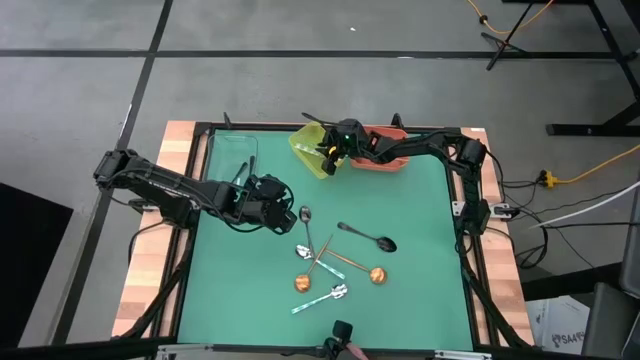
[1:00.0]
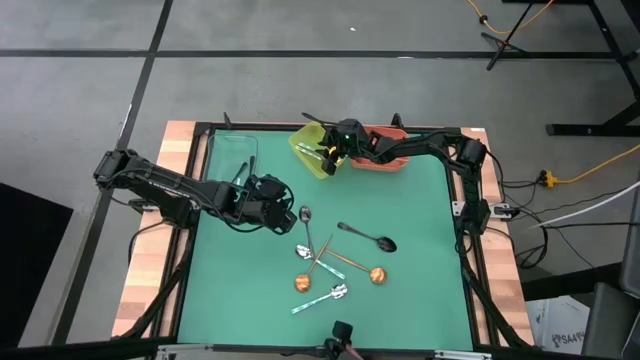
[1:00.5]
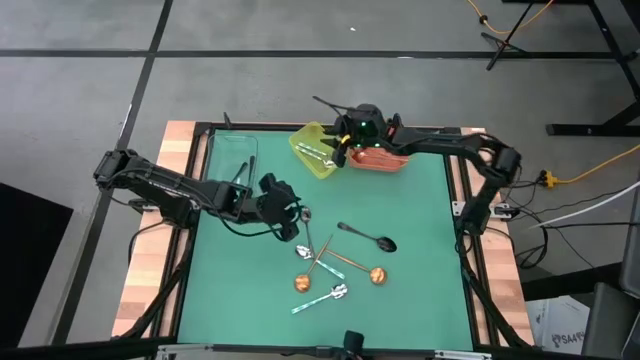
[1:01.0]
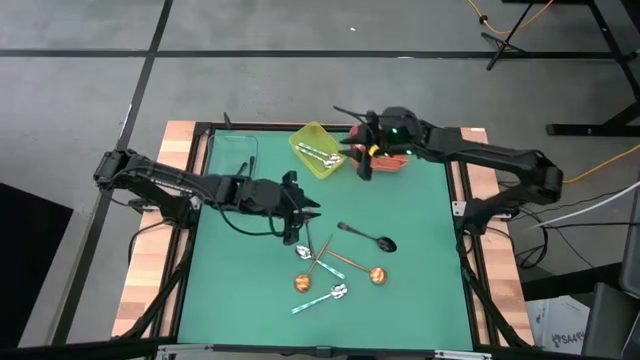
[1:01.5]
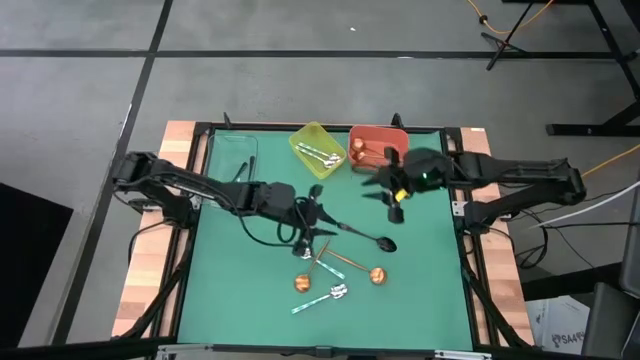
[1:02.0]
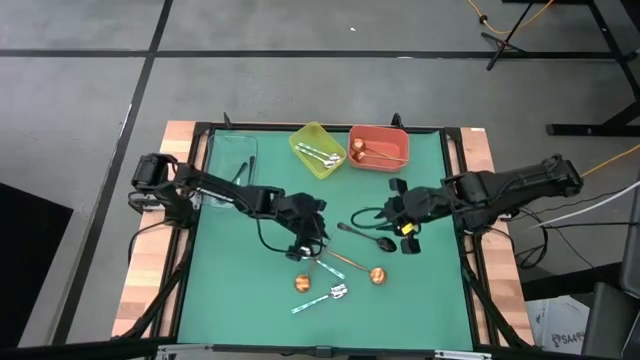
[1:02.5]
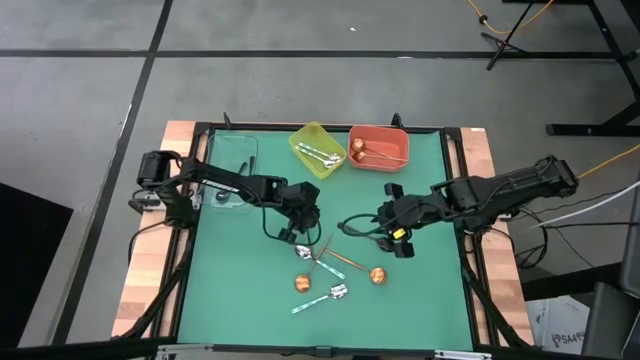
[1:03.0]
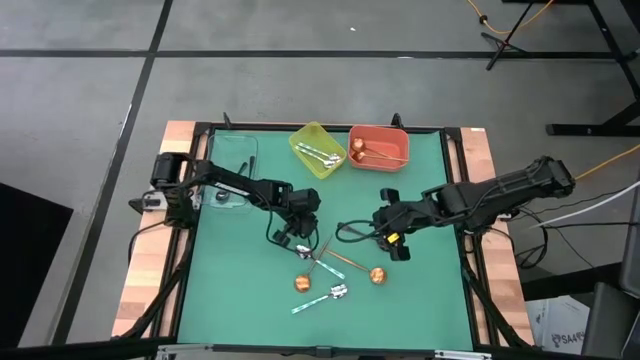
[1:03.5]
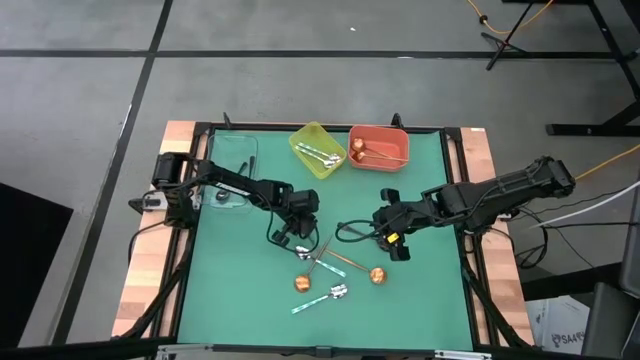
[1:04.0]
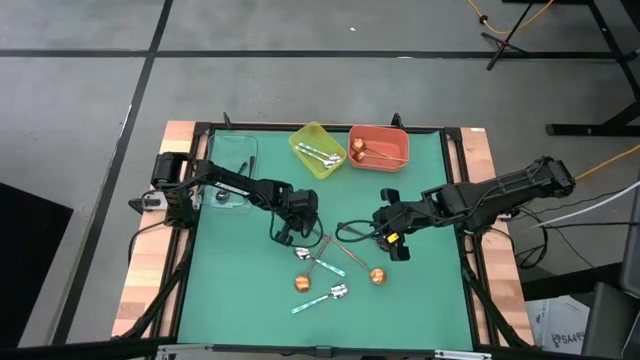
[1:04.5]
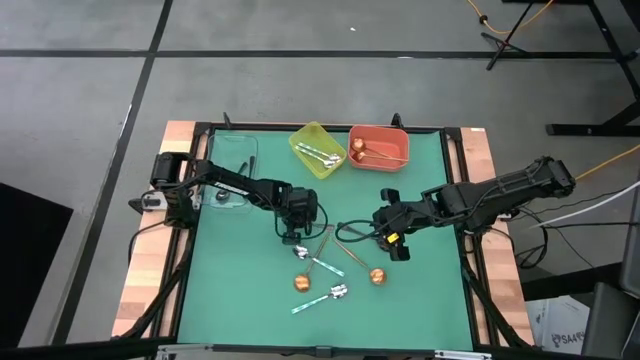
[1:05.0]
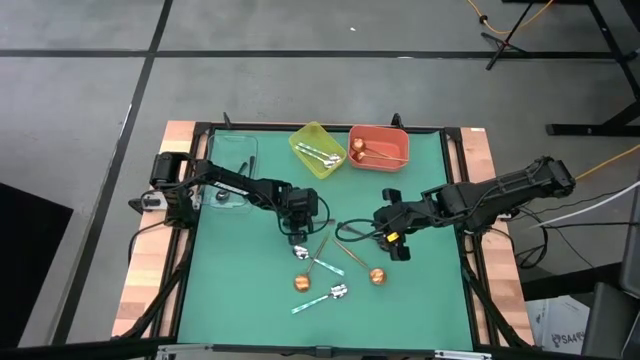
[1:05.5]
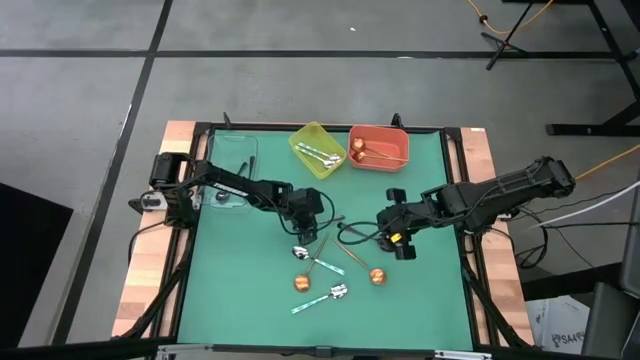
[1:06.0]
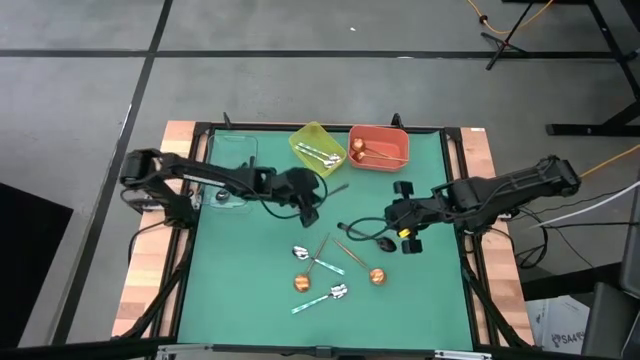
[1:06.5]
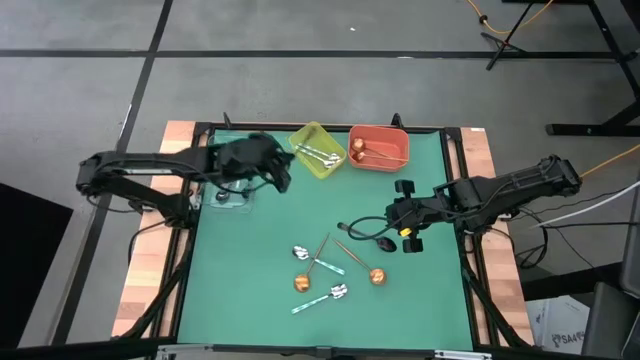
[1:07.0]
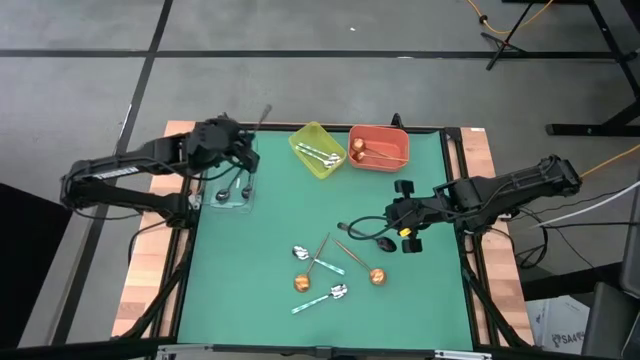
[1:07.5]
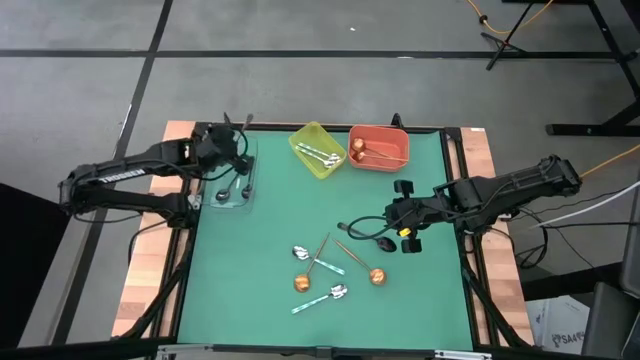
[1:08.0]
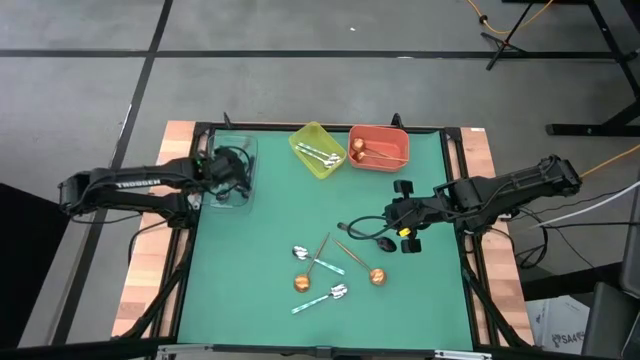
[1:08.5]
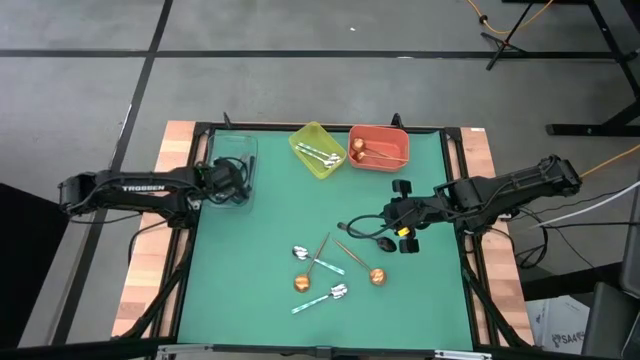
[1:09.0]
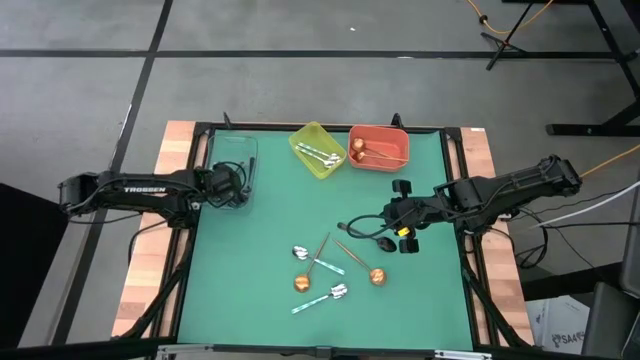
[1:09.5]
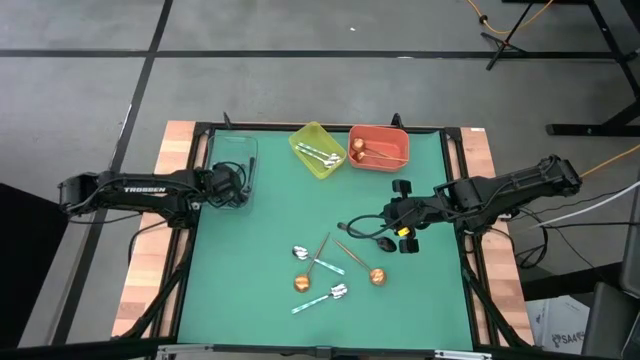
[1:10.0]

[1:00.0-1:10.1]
Task: Sort silverware by color (type)
Put the black spoon into the transparent bin

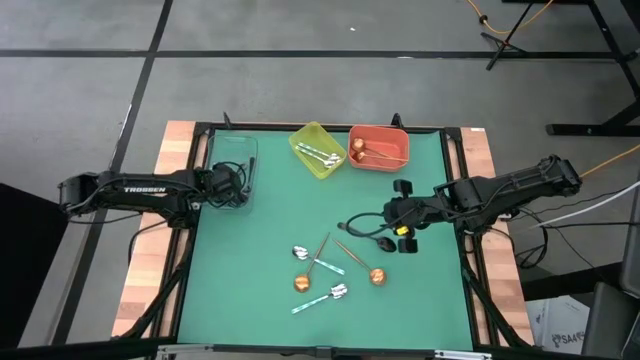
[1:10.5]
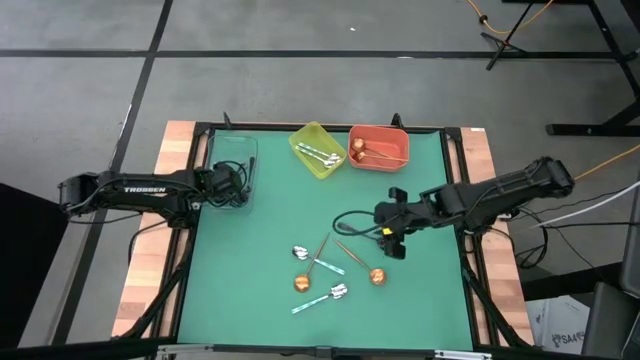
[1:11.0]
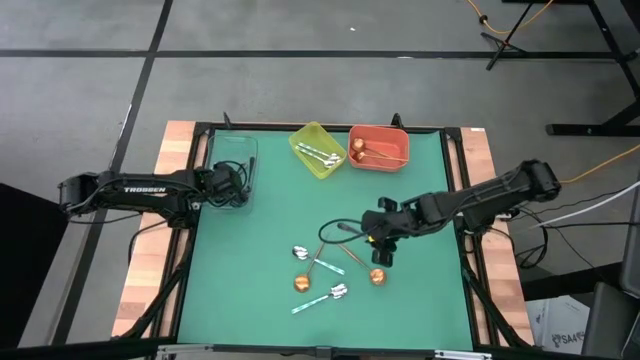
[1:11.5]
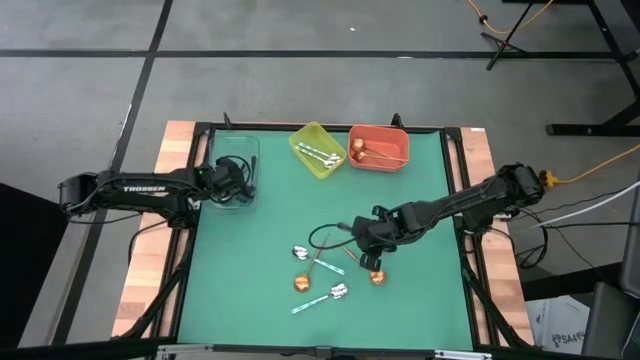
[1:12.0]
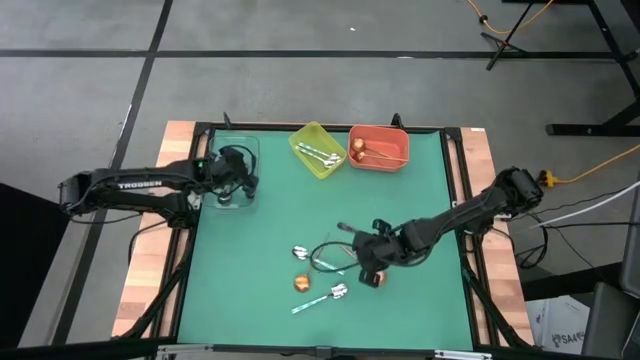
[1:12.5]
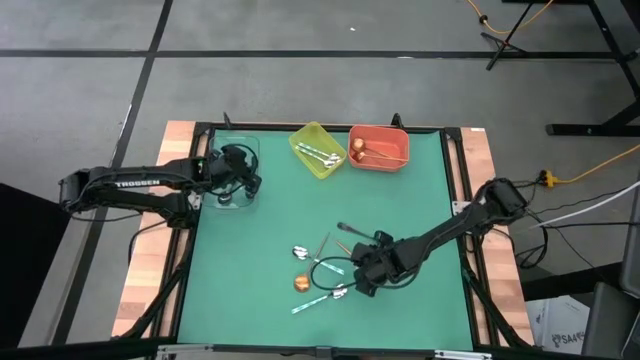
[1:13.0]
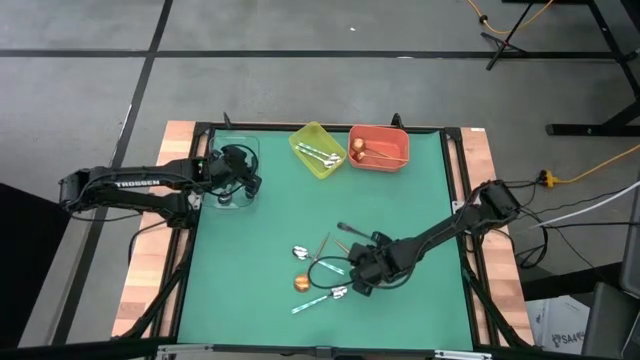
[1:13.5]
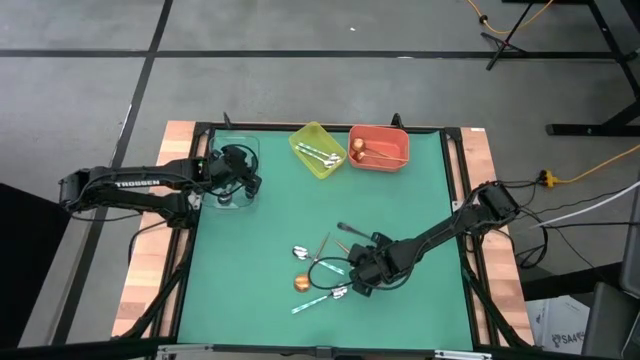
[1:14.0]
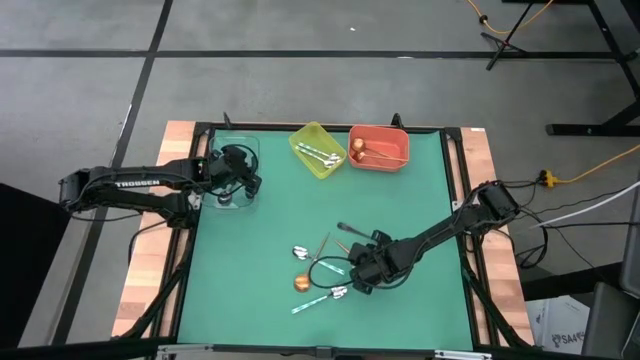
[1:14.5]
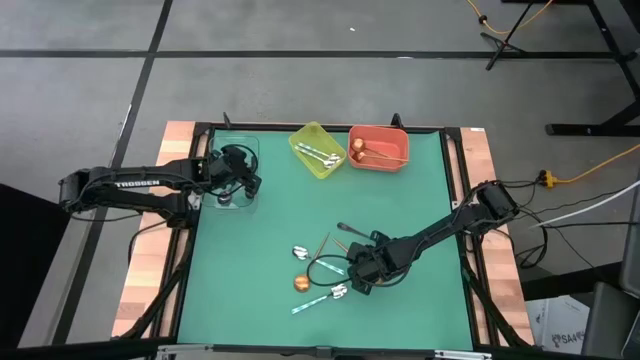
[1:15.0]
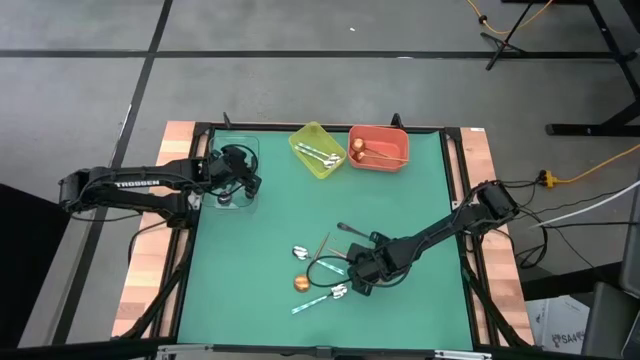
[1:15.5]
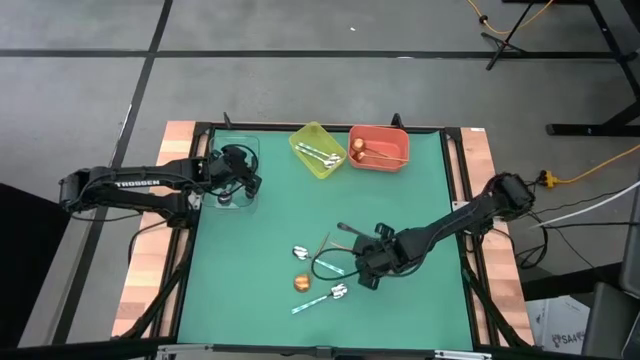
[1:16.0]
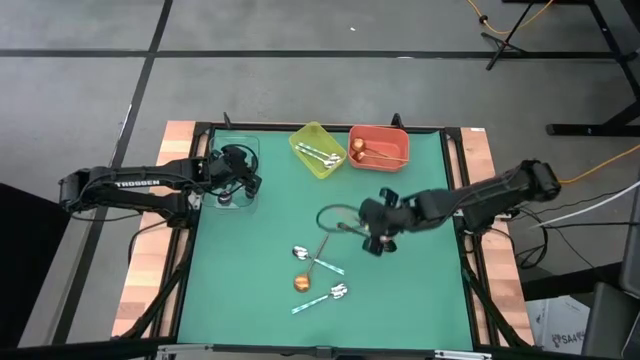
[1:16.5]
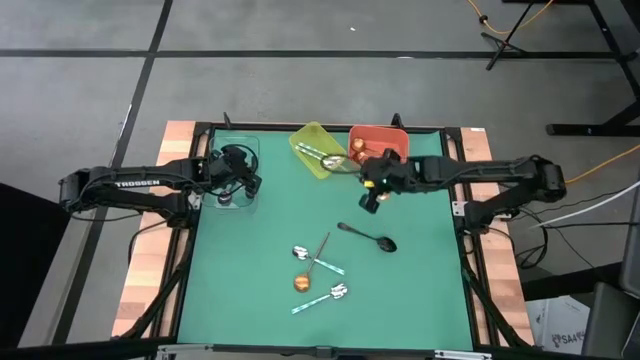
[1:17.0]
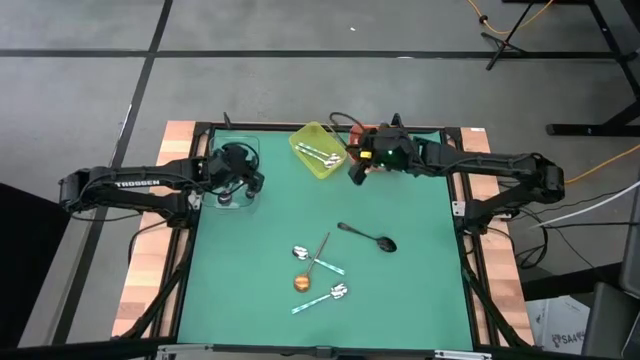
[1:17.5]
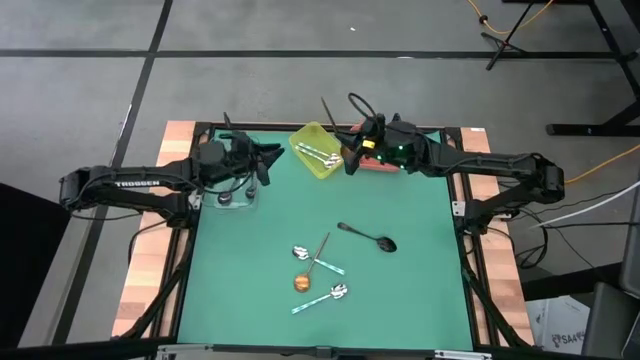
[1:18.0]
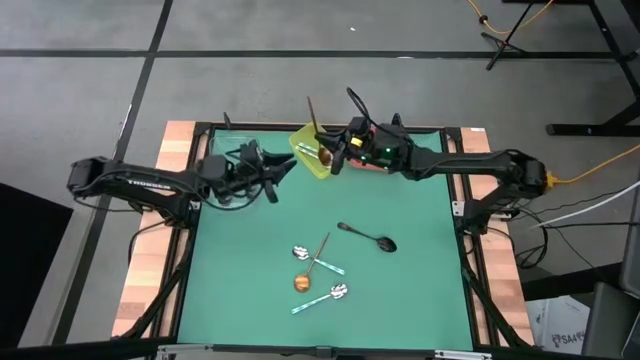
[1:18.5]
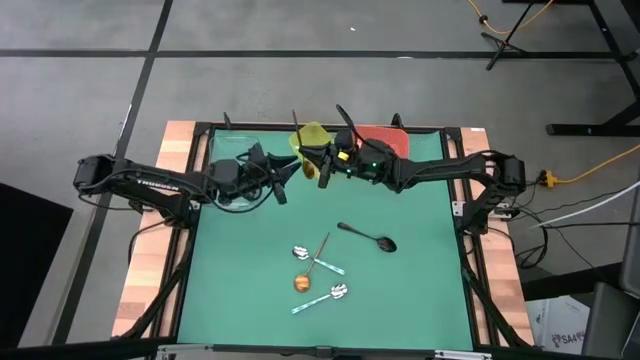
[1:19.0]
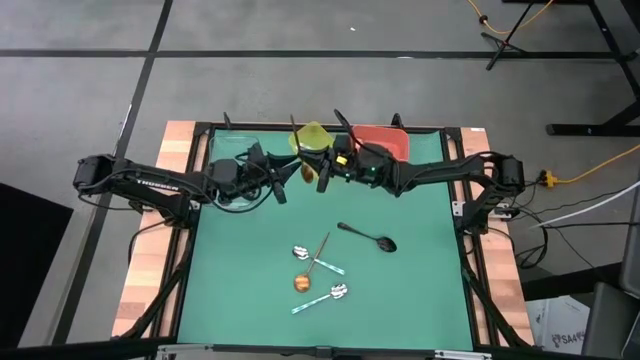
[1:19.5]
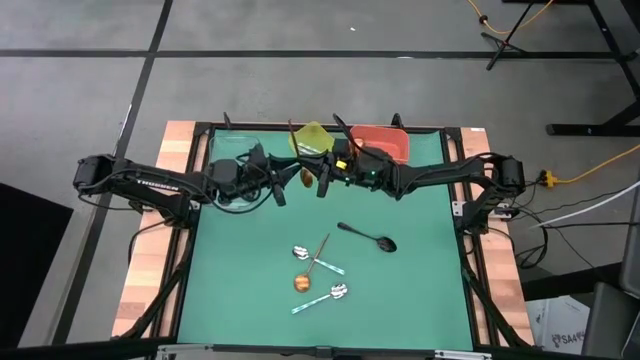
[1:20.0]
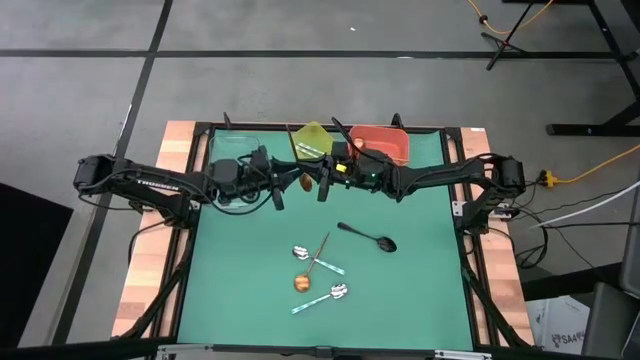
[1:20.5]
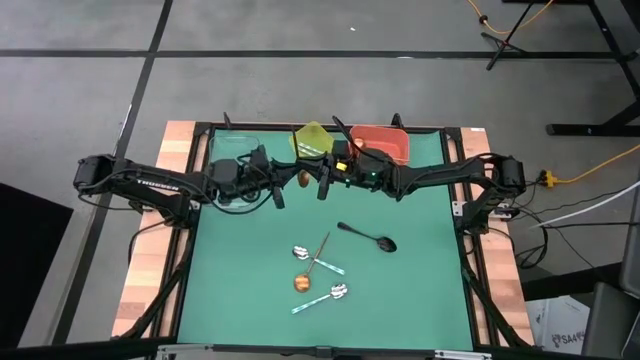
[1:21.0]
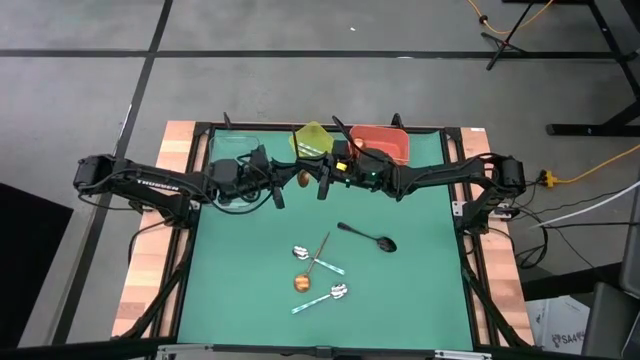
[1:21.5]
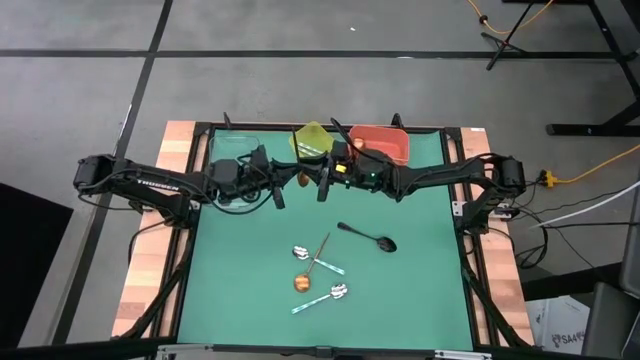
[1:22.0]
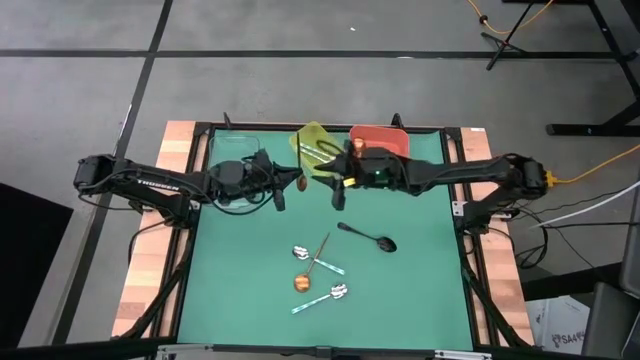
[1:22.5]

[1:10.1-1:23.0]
Put the gold spoon into the orange bin
